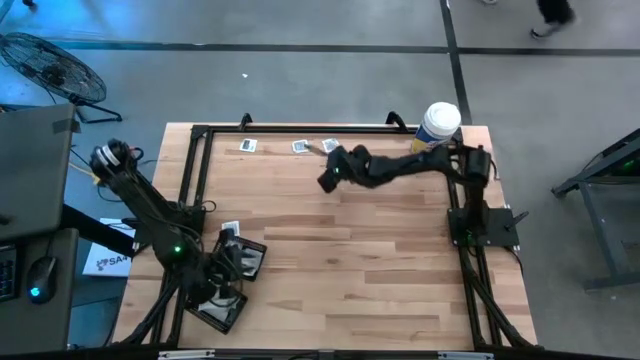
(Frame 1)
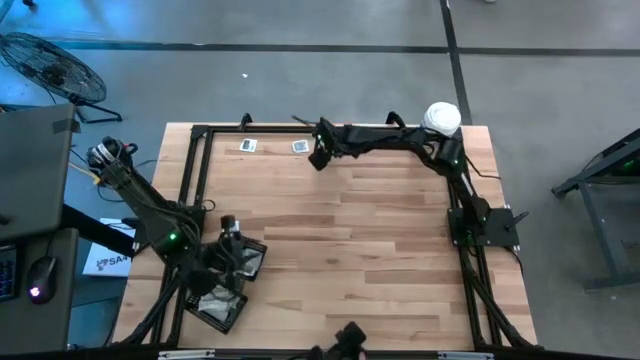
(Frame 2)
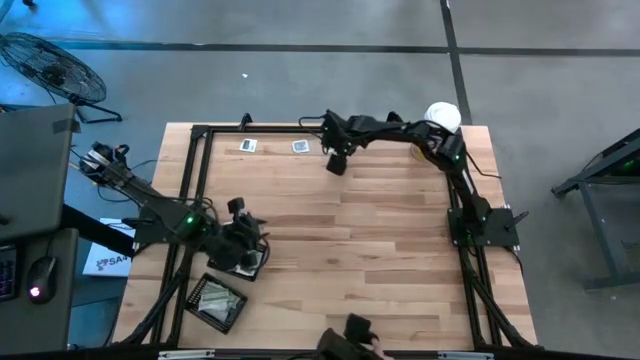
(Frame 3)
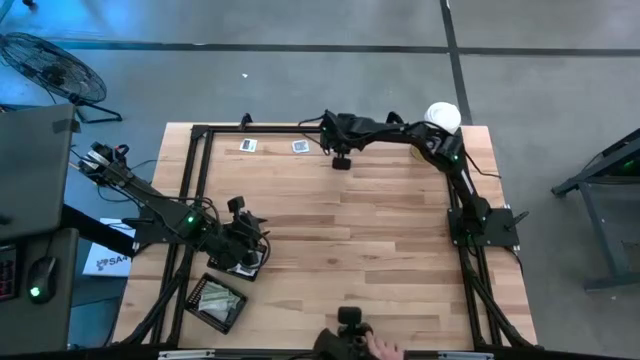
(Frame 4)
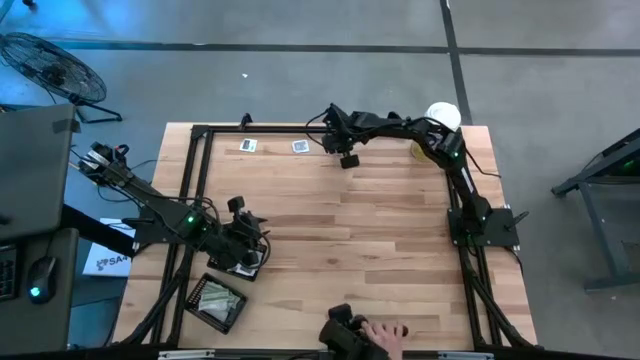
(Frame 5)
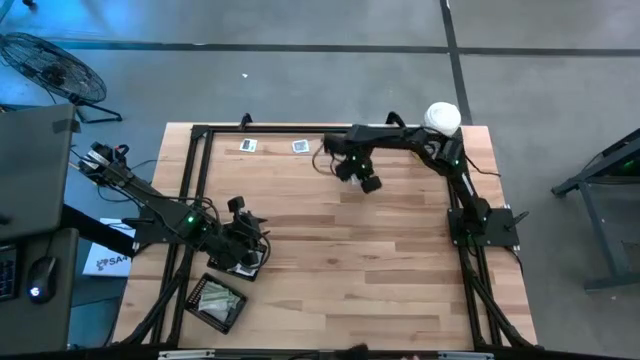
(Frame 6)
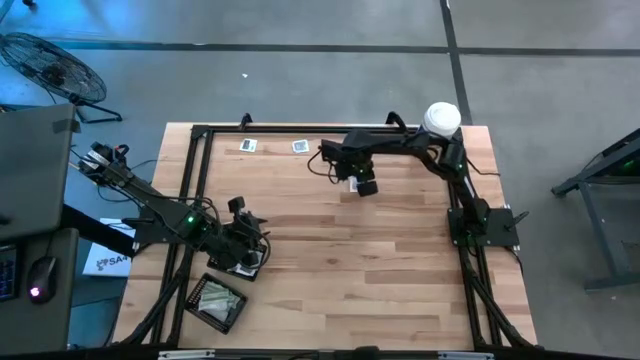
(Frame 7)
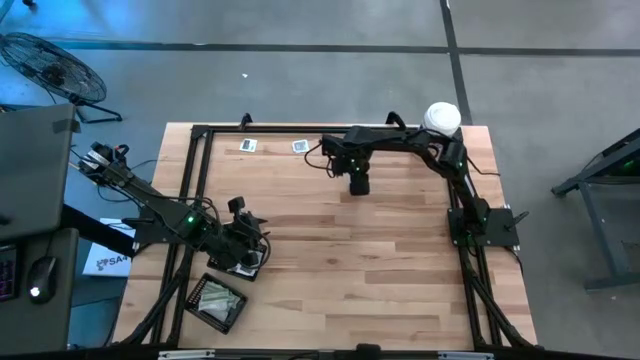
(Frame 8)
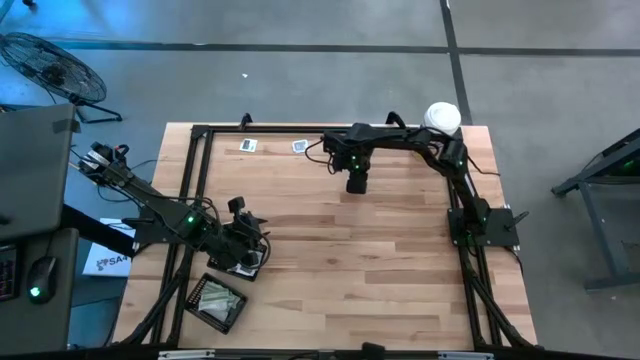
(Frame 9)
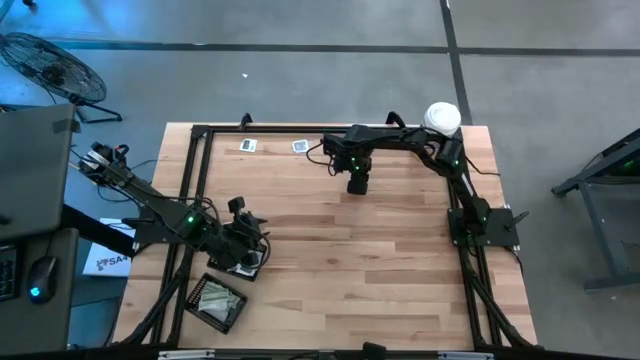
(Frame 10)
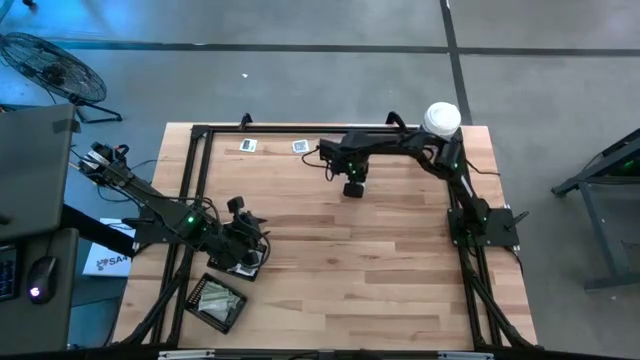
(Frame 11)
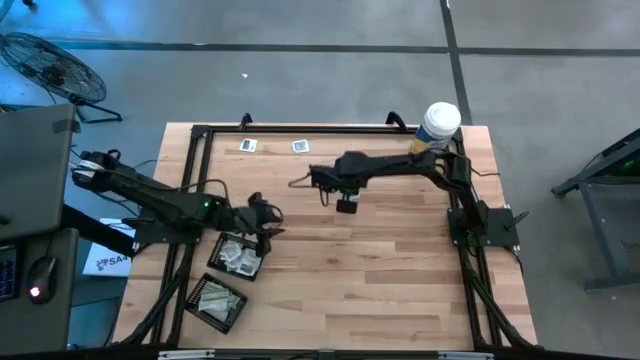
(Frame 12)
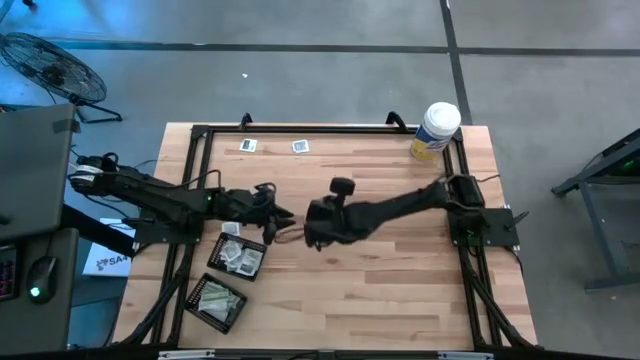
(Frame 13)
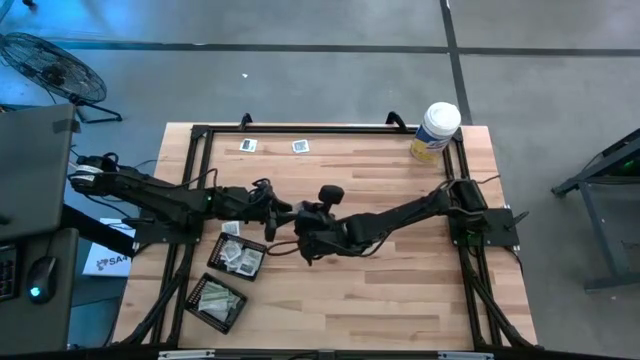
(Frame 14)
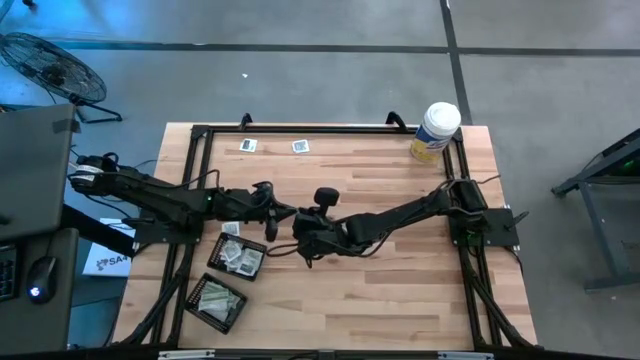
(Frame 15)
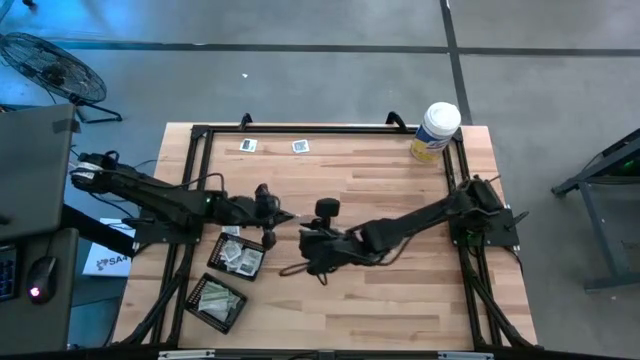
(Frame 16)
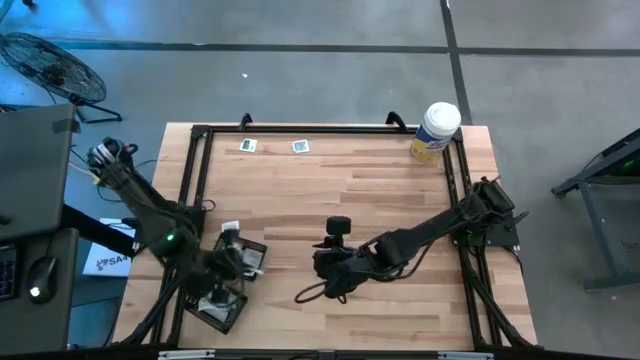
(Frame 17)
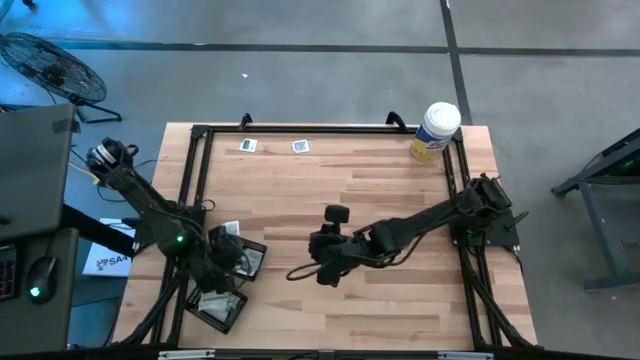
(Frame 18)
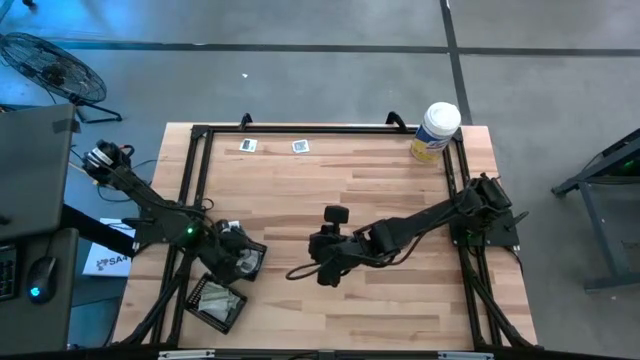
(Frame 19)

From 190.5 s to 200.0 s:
Task: Pick & Place First Aid Supplies
Put the towelette pack into the top black bin

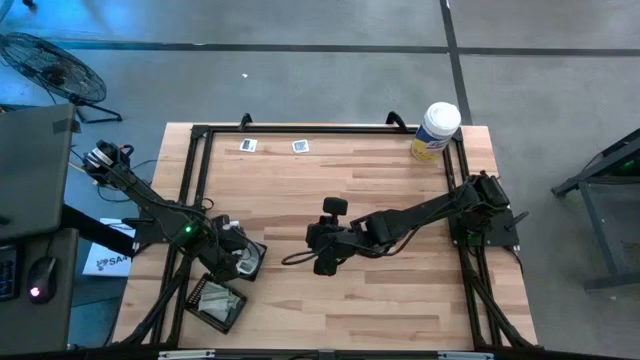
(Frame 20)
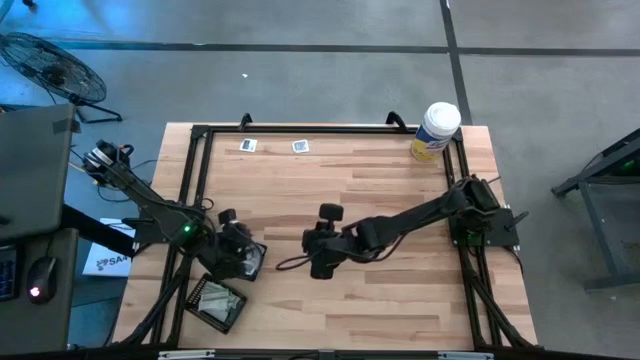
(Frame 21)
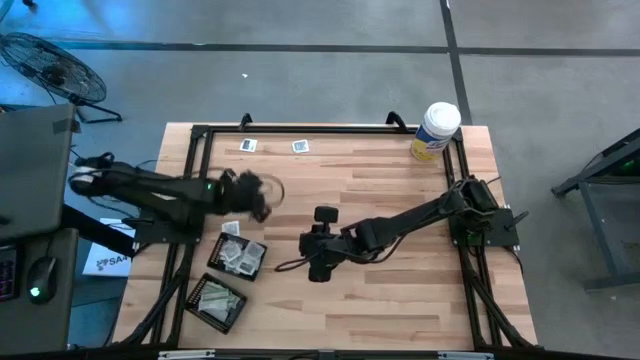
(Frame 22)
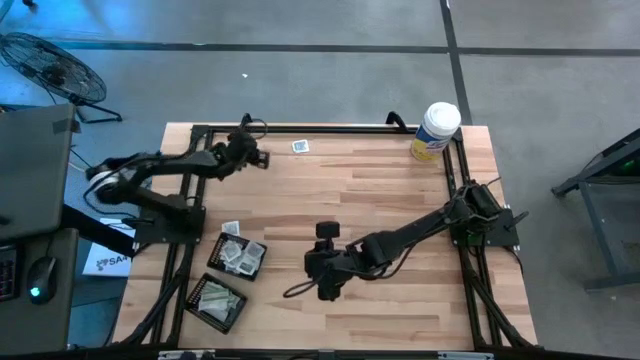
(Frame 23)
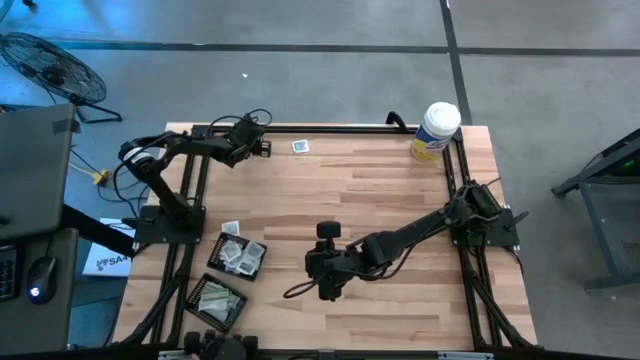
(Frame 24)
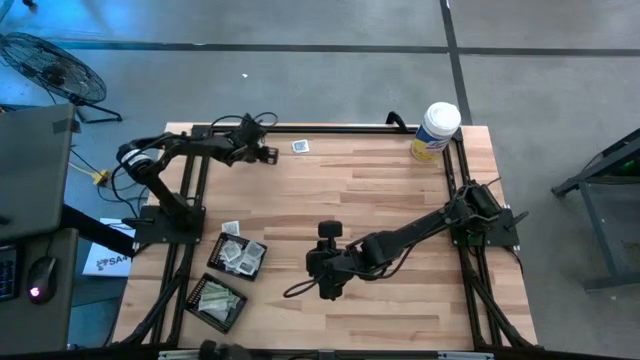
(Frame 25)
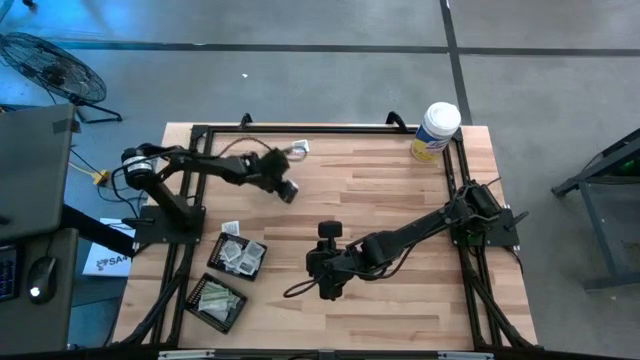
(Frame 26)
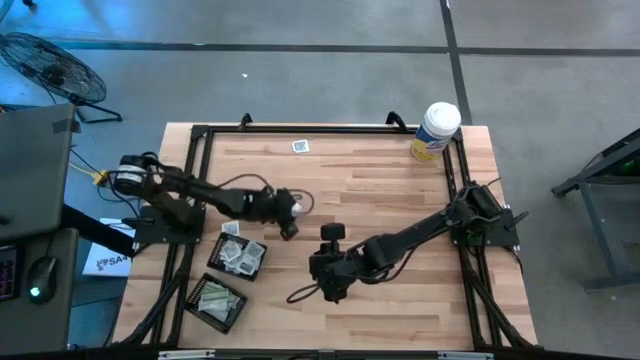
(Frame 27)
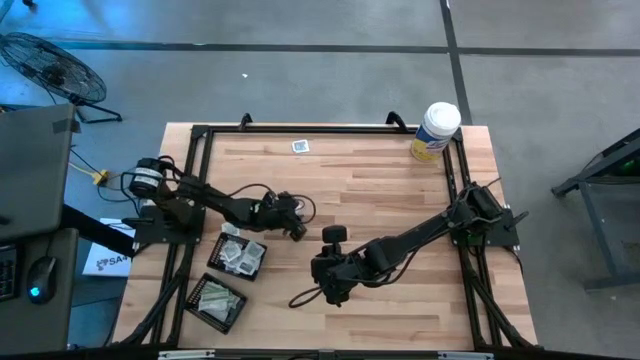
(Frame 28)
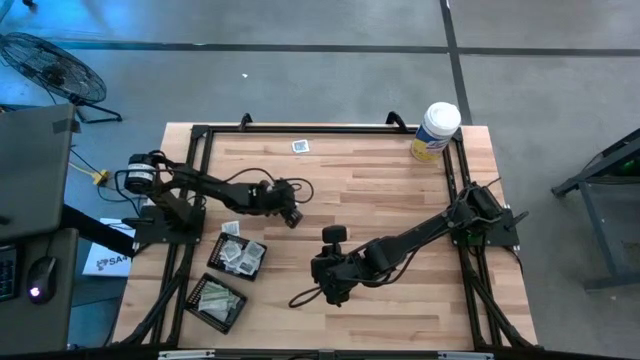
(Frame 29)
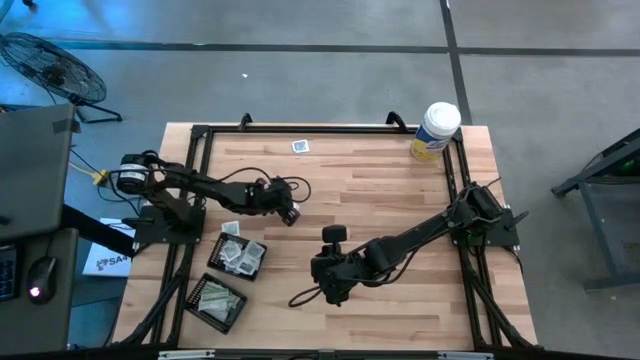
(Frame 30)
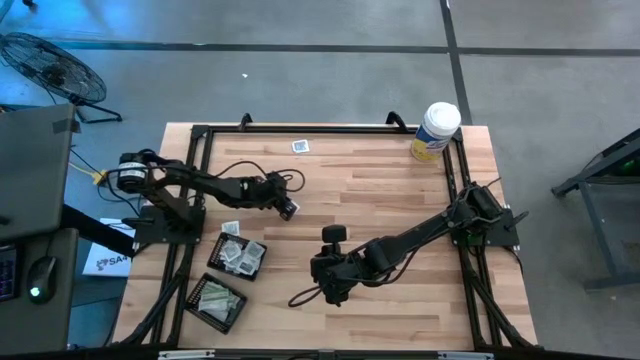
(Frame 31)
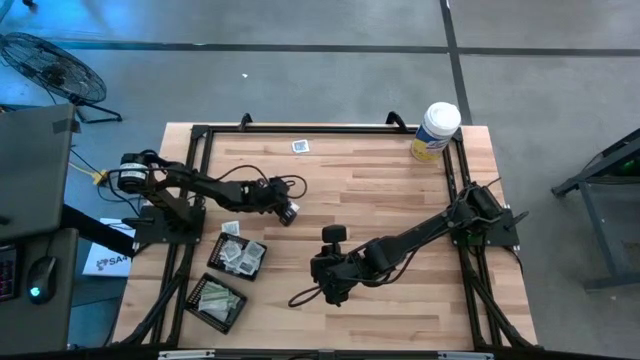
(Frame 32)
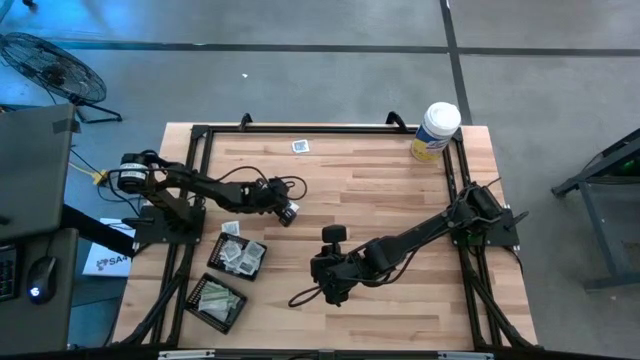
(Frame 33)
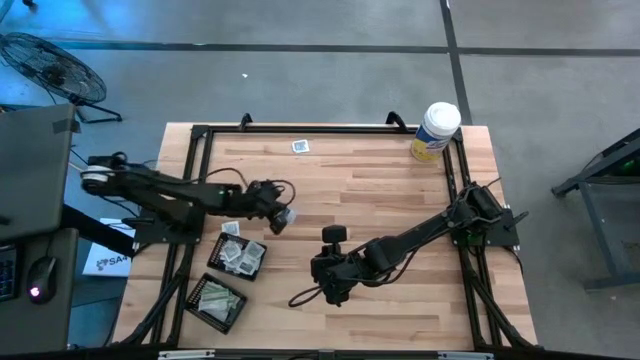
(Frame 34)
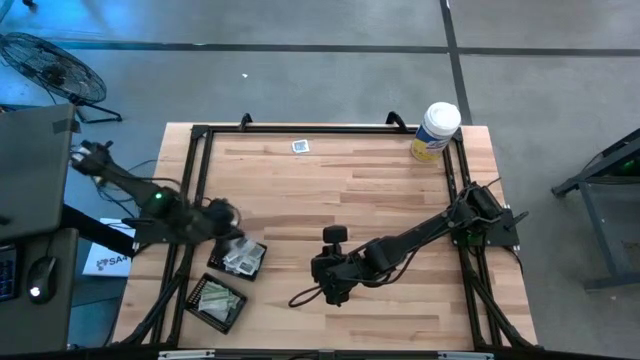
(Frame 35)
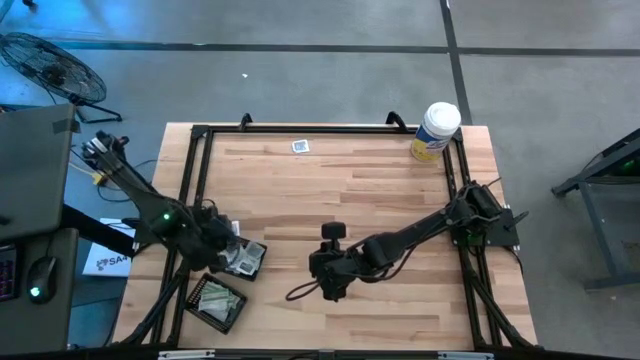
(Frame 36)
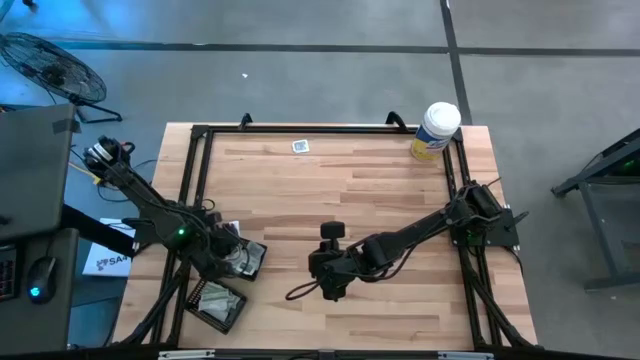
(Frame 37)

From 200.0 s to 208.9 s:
Put the towelette pack into the top black bin

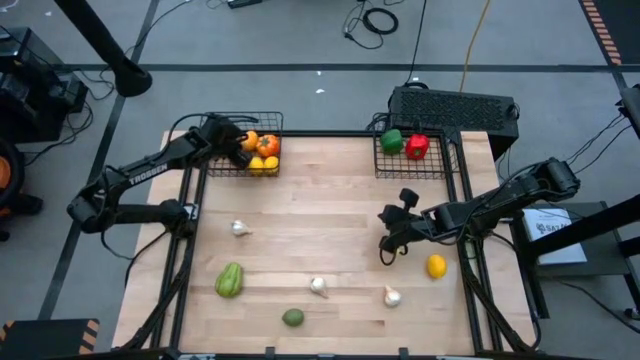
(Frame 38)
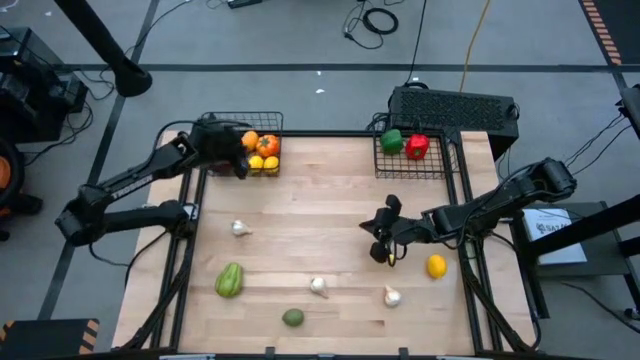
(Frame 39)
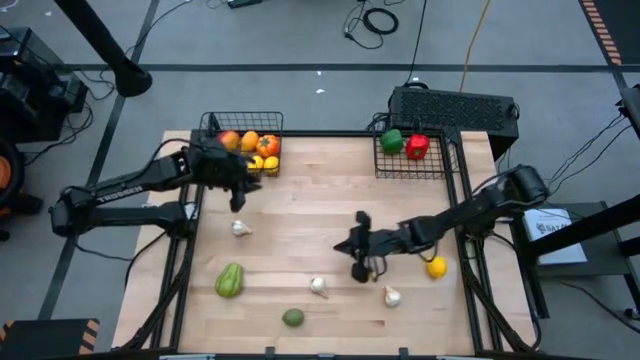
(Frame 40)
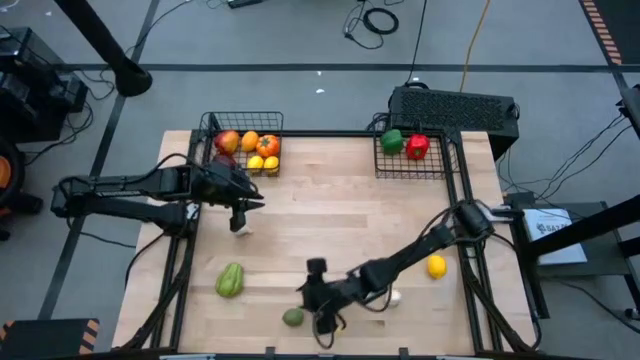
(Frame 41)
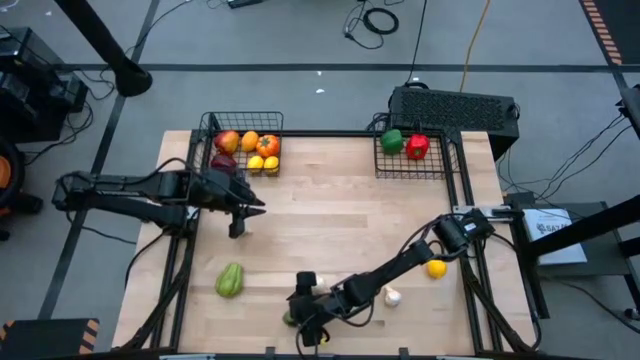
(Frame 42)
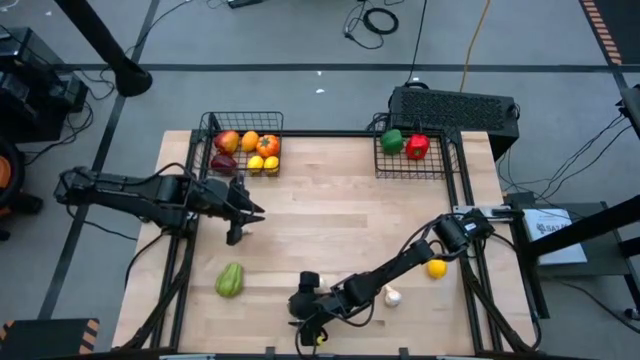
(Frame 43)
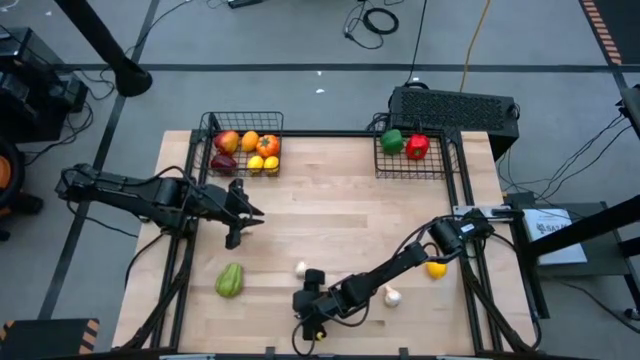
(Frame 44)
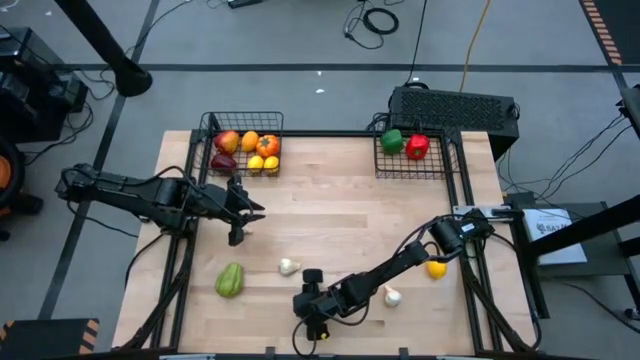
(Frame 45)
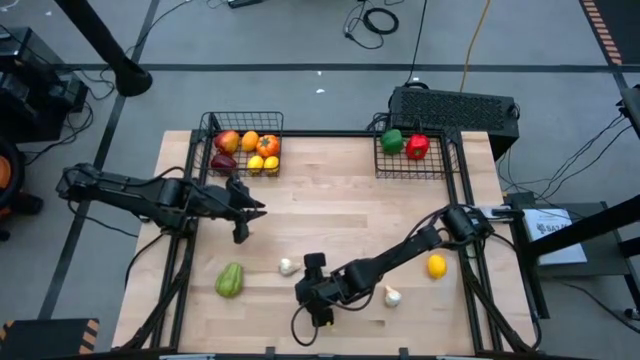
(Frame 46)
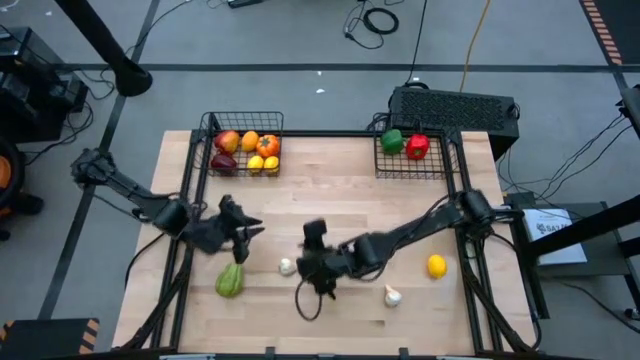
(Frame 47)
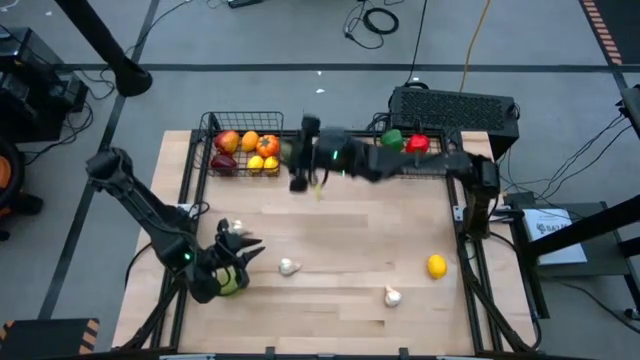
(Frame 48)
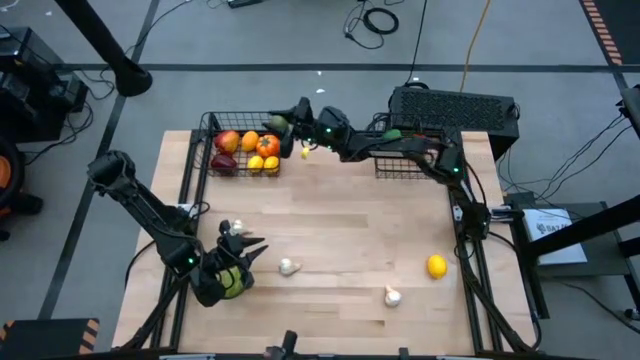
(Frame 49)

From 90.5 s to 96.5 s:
Task: Sort produce into baskets
Put the green lime in the left basket
